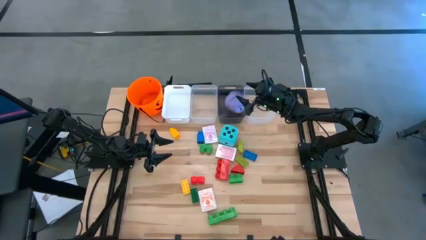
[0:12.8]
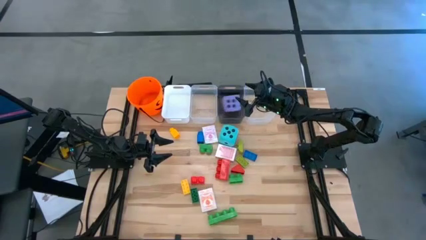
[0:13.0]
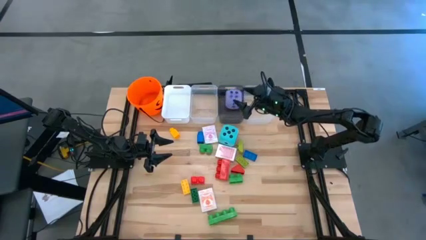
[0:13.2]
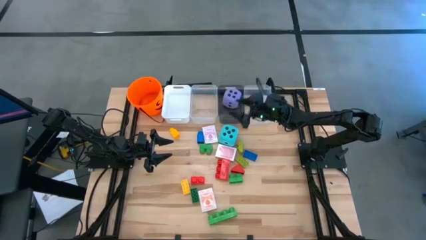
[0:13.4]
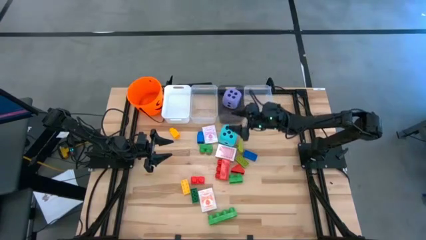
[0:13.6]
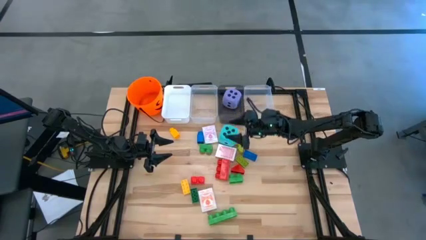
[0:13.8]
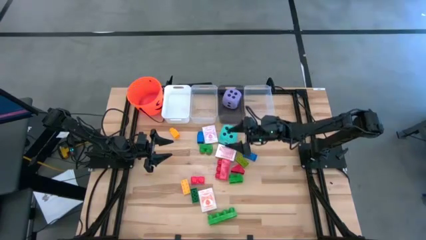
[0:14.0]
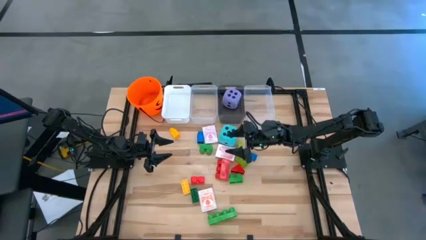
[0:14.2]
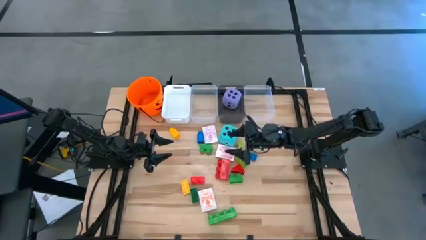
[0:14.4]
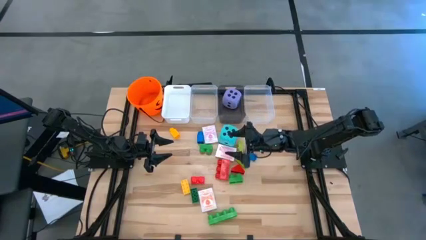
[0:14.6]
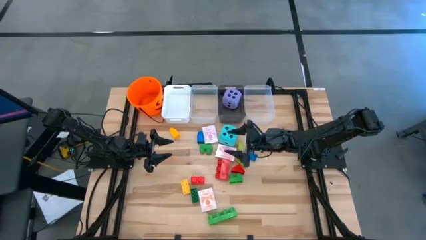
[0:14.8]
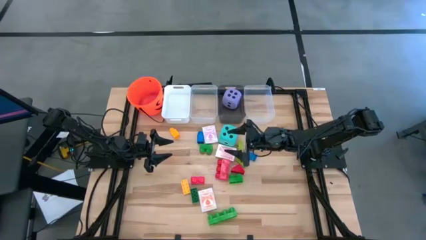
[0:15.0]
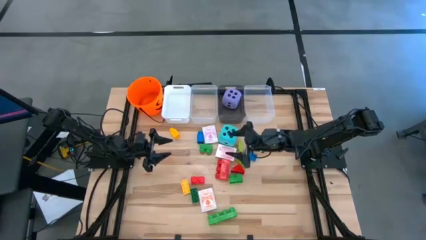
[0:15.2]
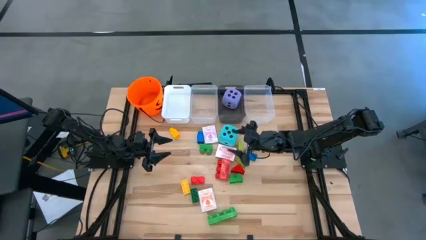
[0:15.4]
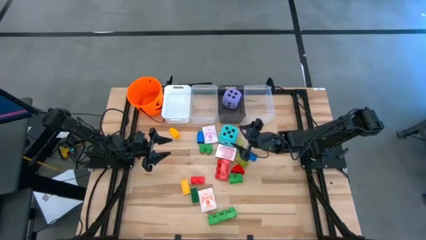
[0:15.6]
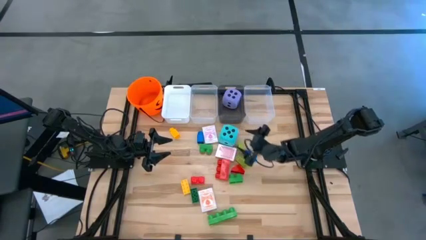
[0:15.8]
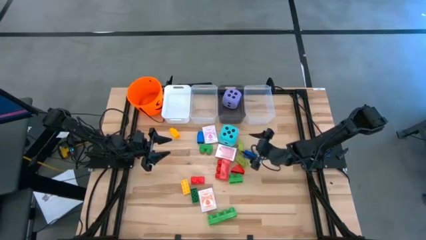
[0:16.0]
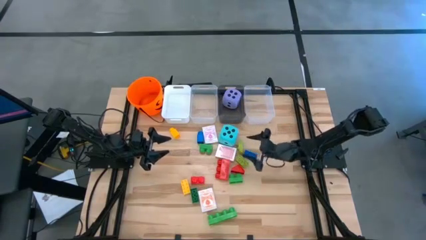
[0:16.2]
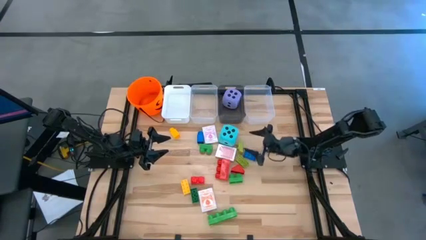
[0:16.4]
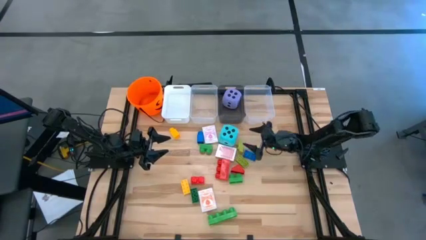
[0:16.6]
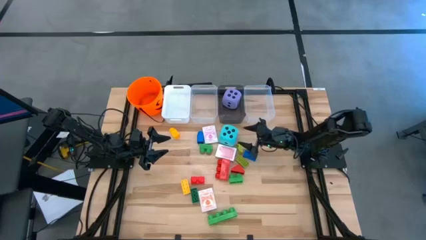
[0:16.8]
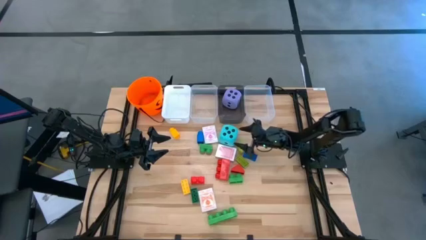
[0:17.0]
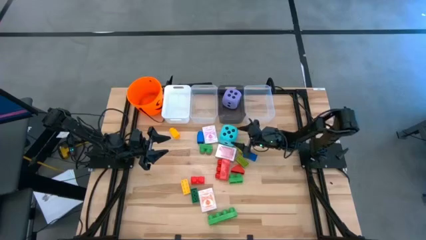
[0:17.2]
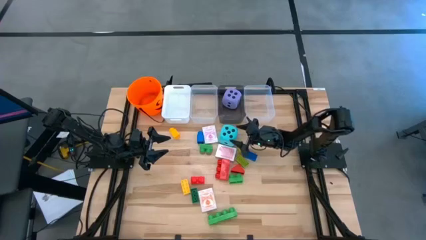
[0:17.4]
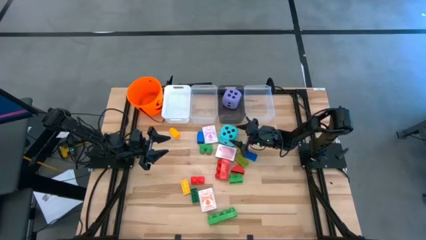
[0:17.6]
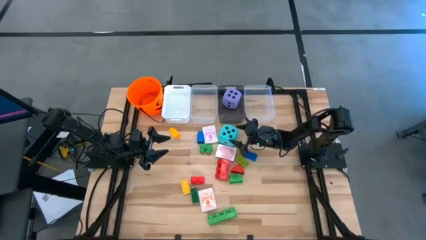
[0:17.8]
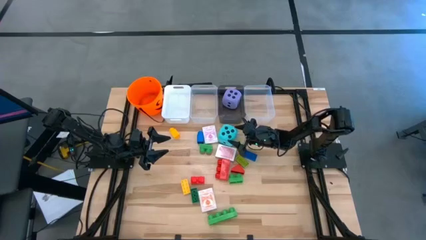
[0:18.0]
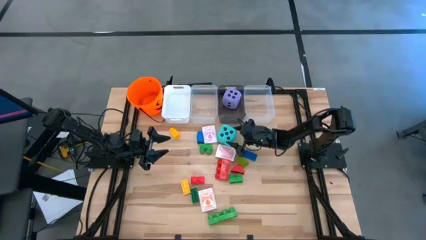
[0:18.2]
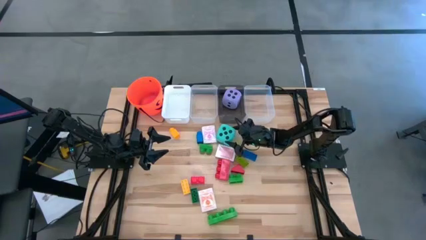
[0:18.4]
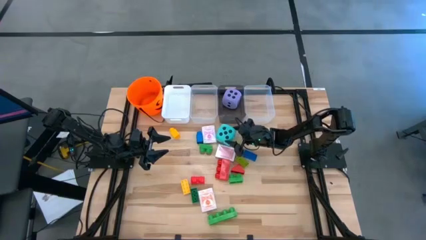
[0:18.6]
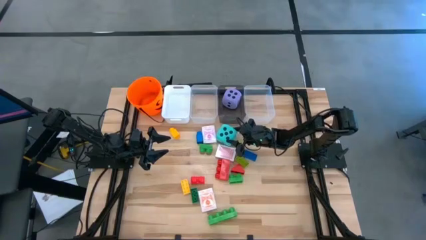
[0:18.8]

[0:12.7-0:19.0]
Task: Pick & Place Toys
Put the blue die into the black bin

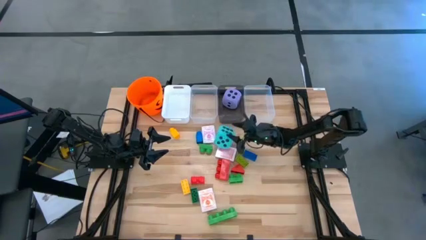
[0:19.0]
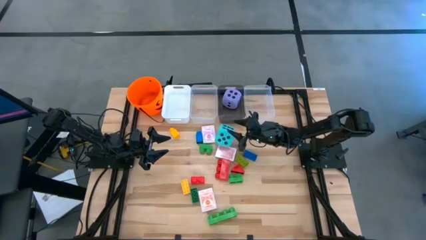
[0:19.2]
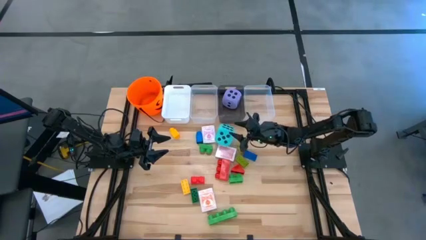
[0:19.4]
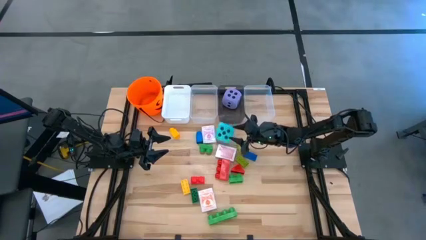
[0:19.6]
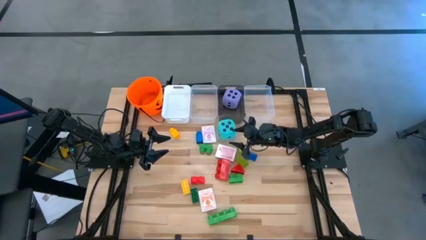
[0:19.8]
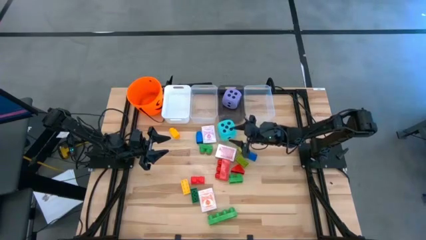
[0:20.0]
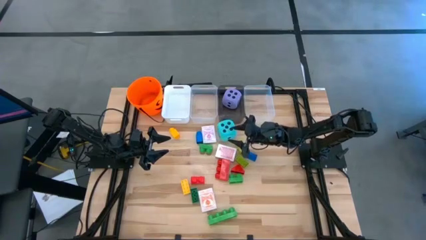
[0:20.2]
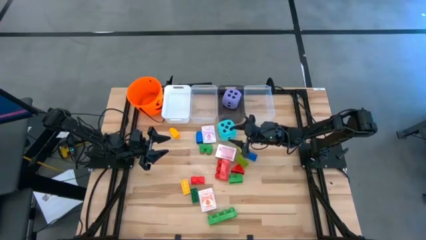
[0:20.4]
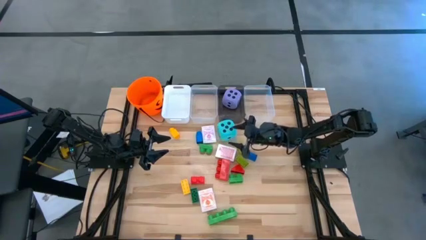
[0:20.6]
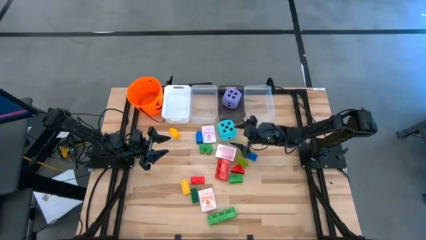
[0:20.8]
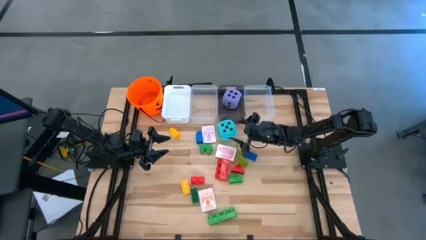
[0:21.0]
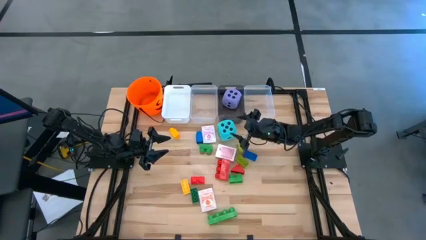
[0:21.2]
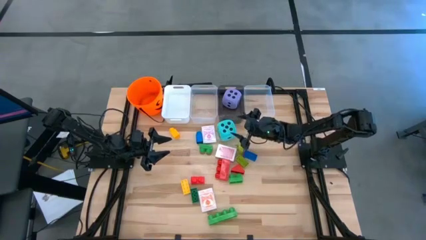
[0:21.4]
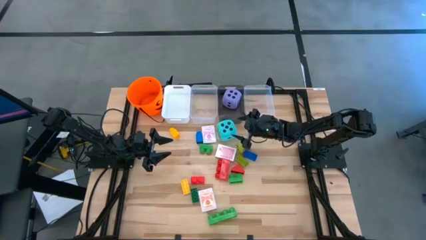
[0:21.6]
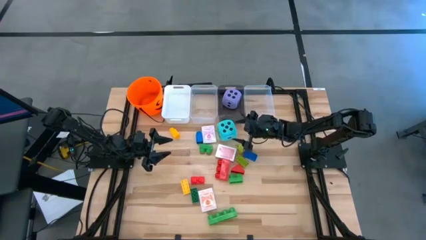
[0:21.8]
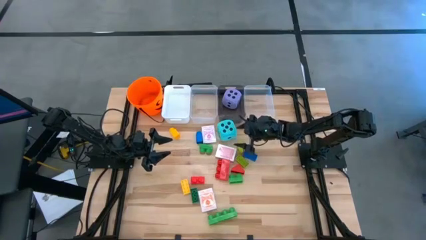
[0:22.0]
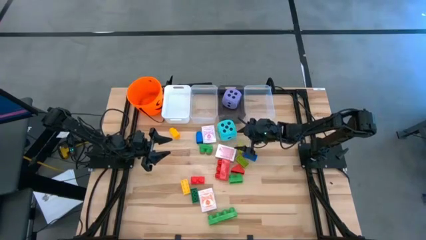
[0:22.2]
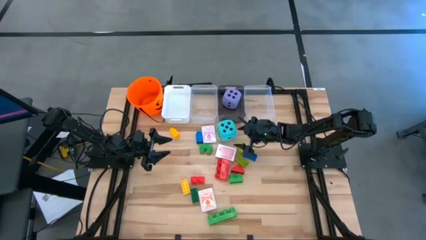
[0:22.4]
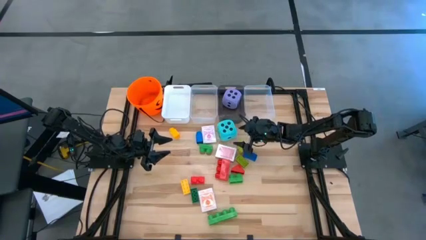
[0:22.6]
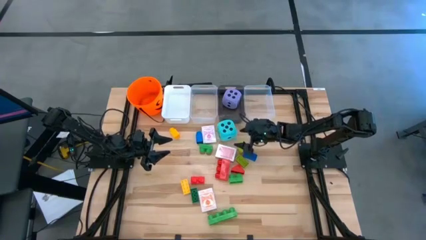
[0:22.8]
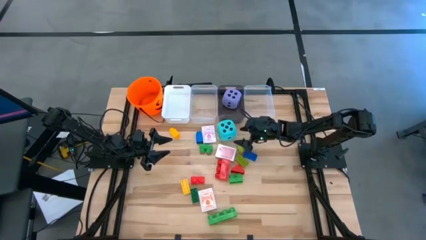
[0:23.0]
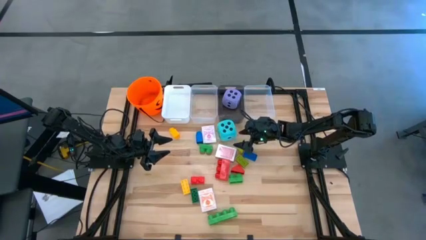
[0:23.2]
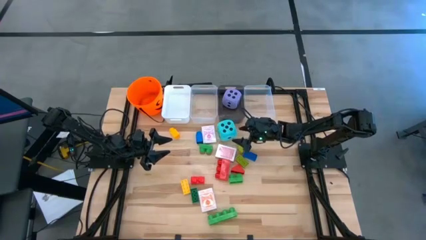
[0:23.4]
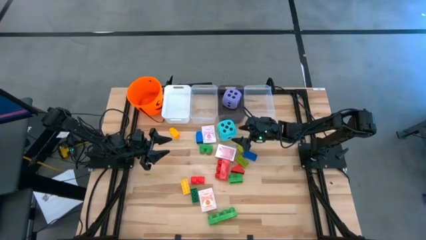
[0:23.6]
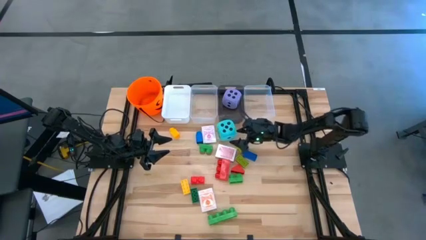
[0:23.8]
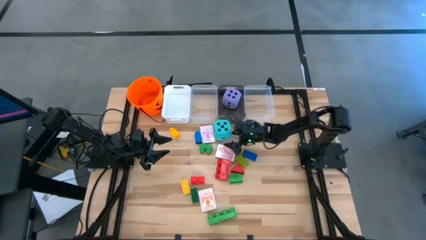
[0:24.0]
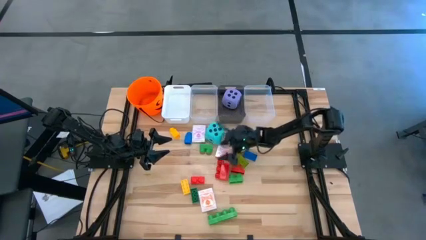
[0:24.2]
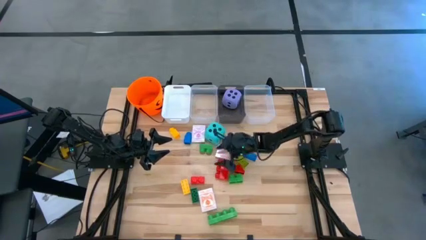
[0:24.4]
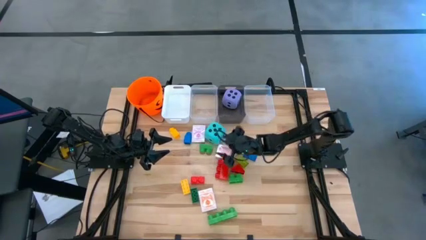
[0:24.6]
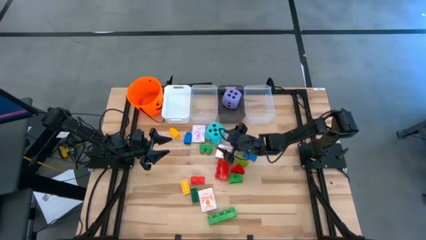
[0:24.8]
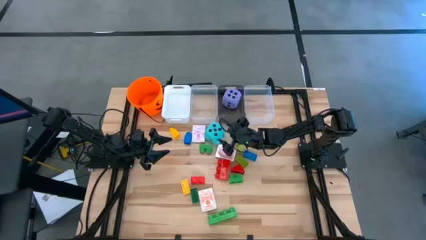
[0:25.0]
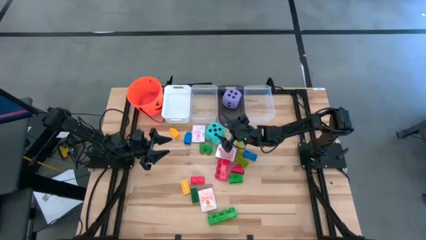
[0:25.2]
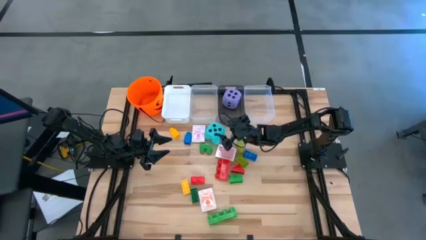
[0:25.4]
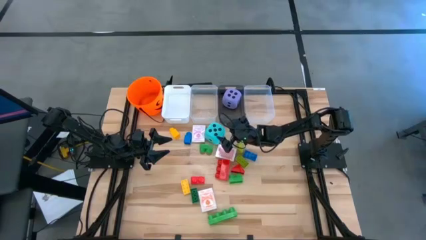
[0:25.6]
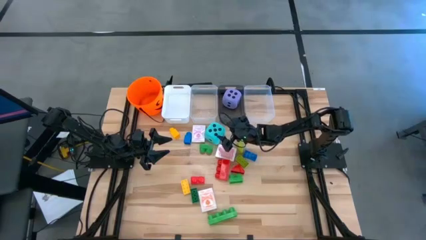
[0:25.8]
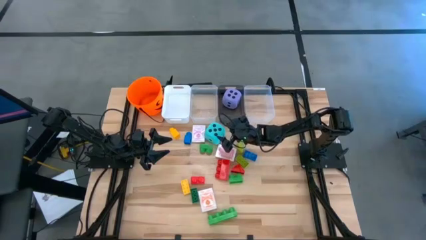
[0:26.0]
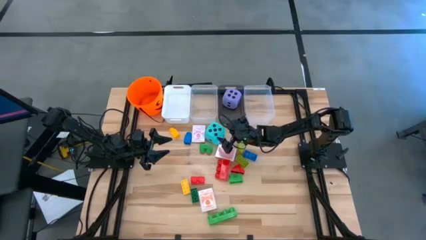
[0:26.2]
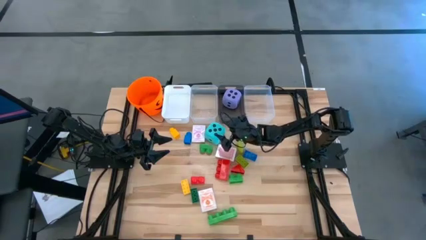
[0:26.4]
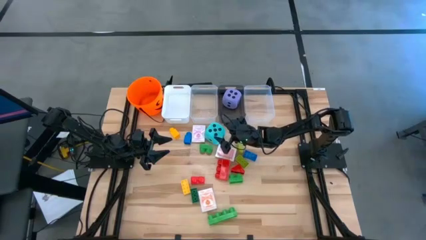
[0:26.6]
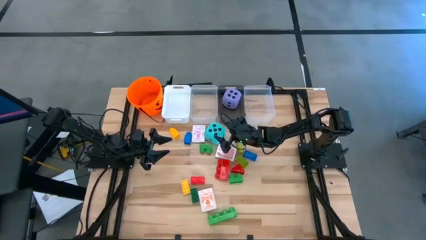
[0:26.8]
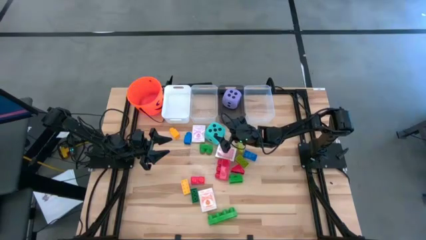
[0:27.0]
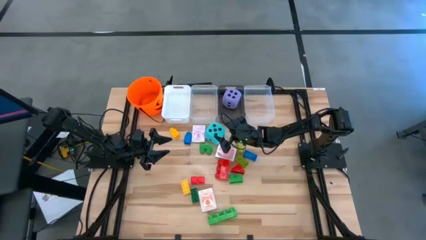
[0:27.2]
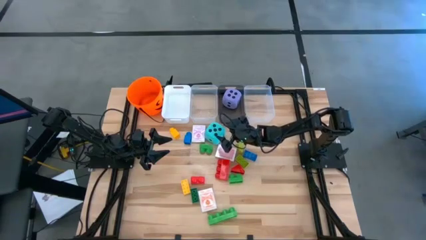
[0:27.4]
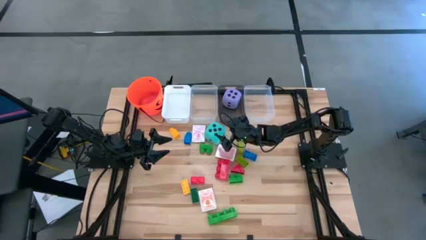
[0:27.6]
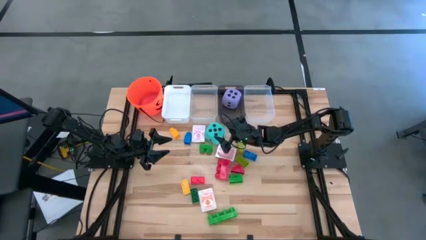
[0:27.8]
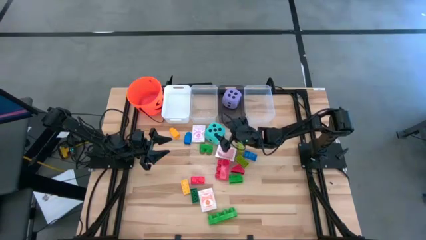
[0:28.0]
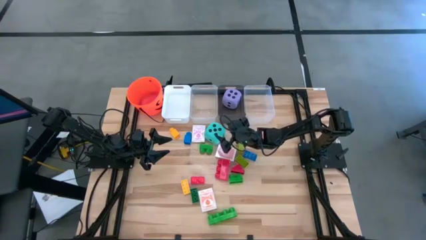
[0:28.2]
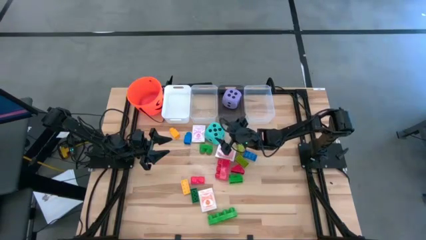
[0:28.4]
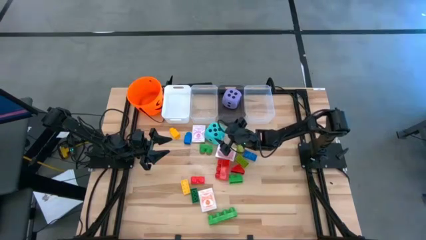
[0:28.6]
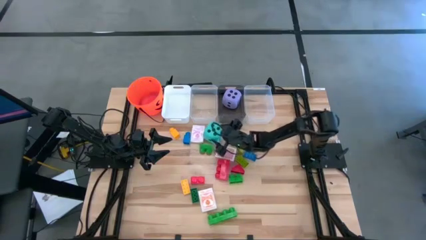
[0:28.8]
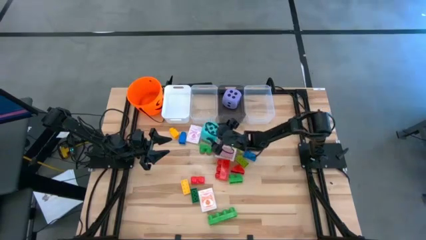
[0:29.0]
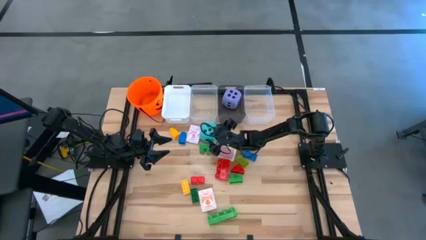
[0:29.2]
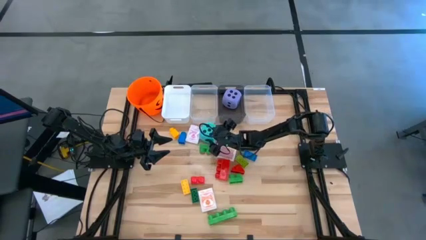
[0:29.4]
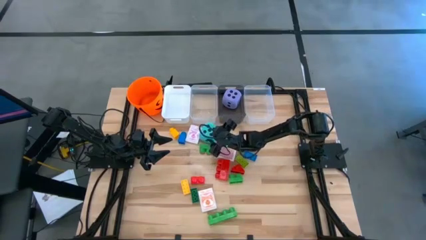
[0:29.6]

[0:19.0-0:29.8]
Put the green die into the black bin
